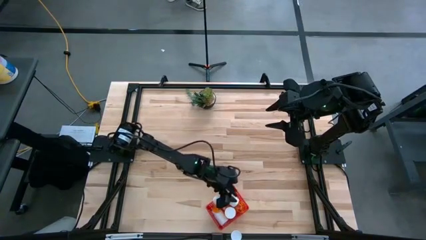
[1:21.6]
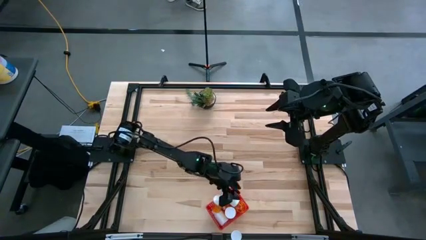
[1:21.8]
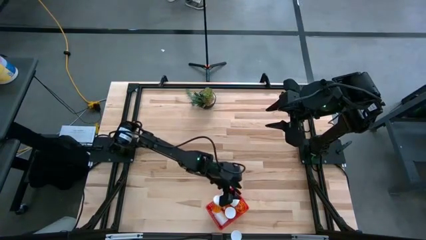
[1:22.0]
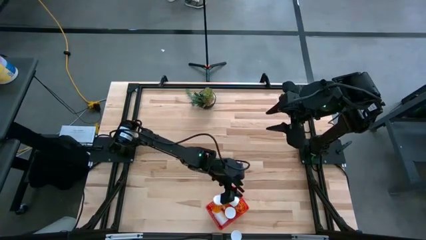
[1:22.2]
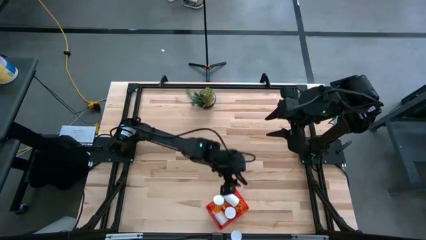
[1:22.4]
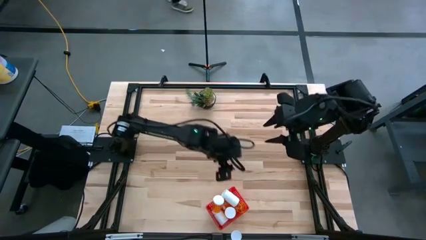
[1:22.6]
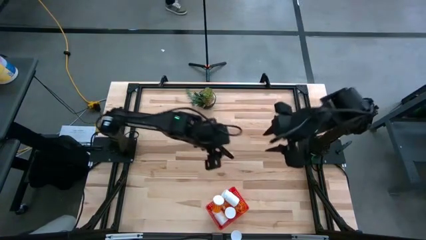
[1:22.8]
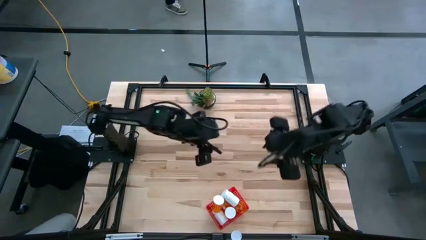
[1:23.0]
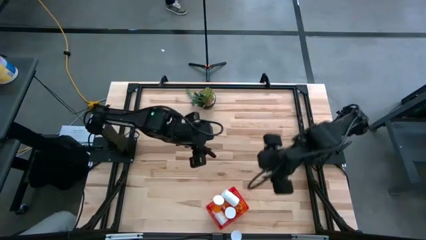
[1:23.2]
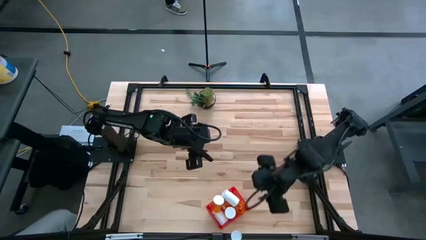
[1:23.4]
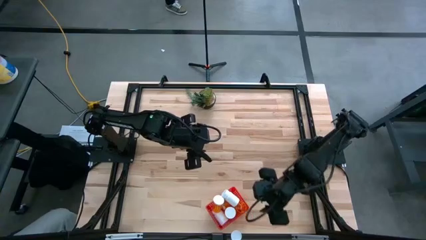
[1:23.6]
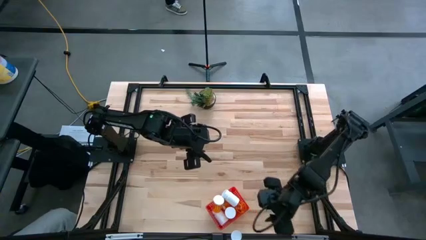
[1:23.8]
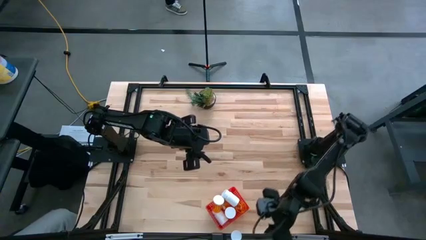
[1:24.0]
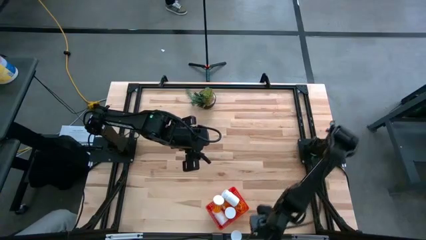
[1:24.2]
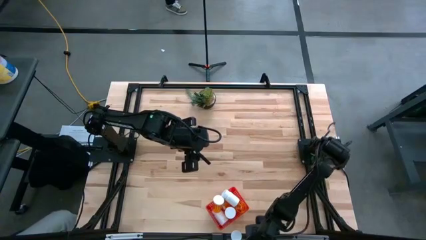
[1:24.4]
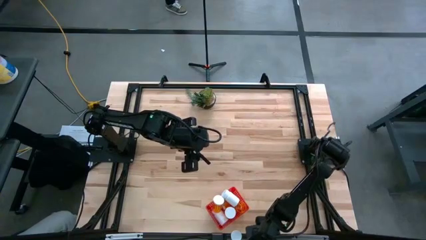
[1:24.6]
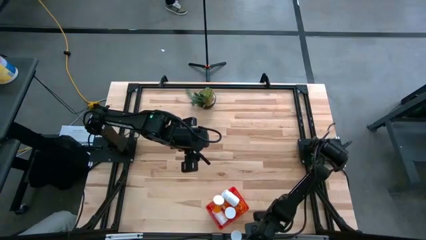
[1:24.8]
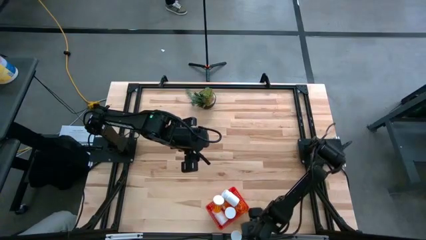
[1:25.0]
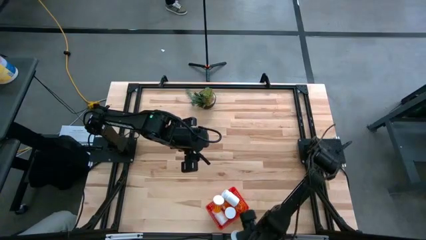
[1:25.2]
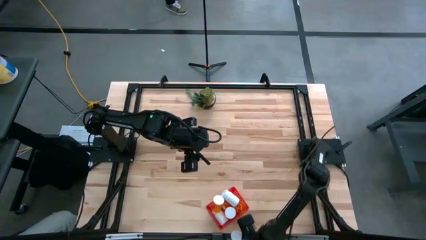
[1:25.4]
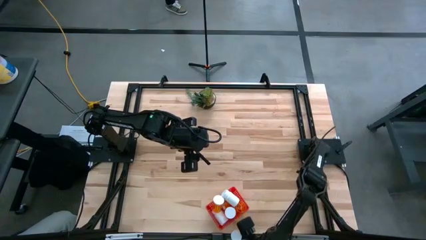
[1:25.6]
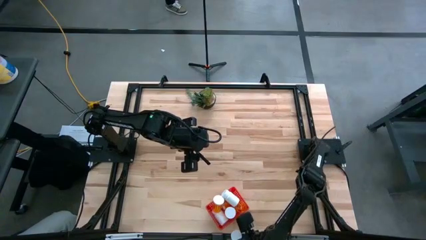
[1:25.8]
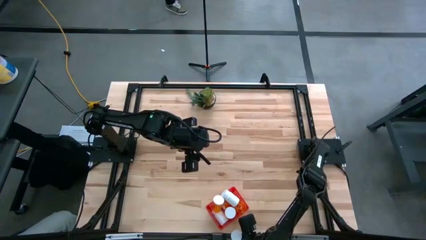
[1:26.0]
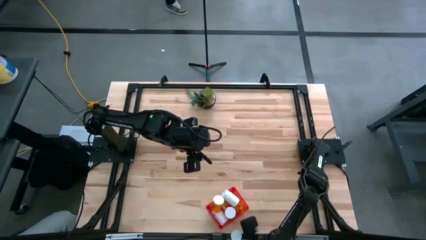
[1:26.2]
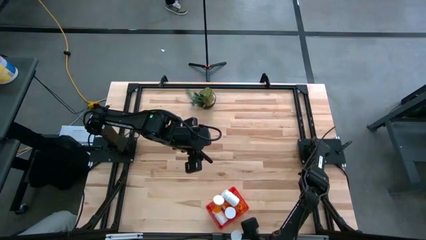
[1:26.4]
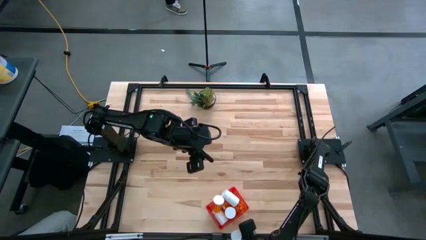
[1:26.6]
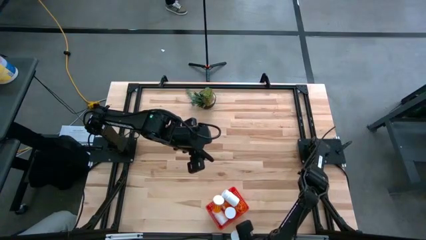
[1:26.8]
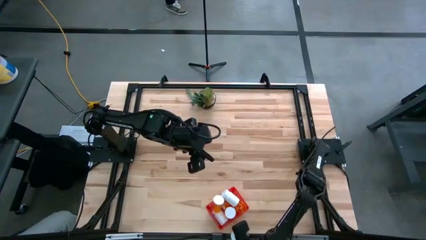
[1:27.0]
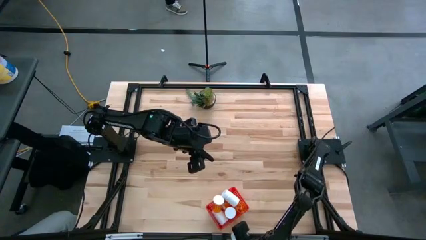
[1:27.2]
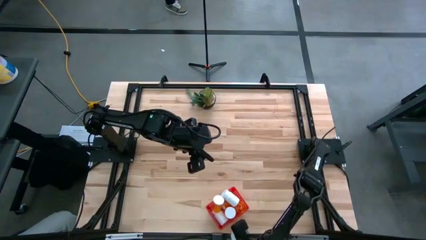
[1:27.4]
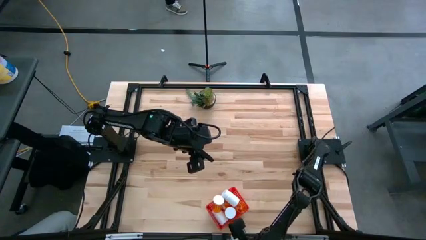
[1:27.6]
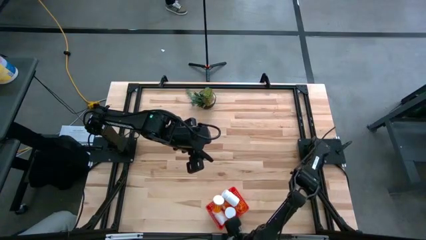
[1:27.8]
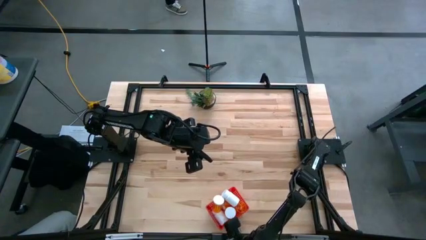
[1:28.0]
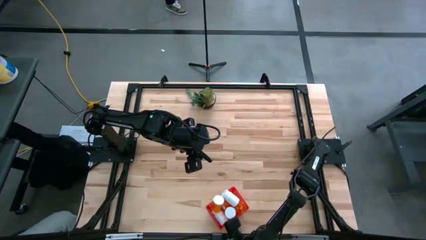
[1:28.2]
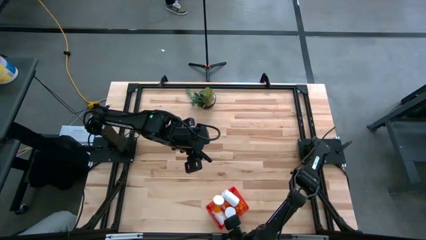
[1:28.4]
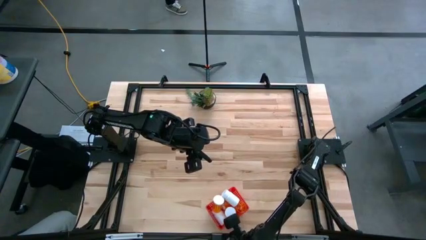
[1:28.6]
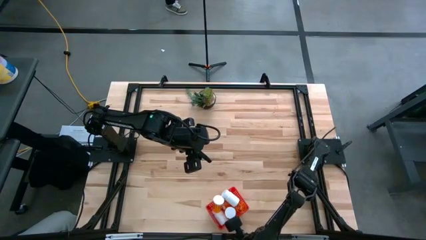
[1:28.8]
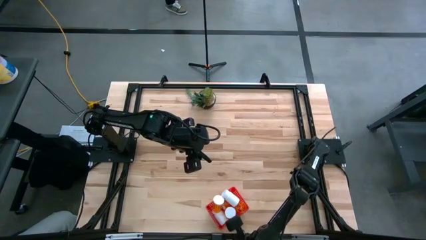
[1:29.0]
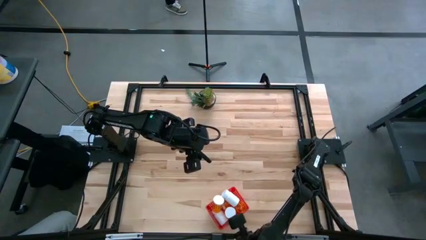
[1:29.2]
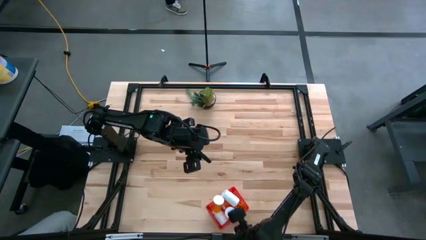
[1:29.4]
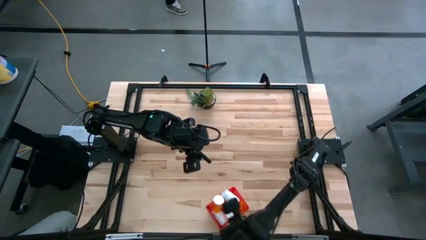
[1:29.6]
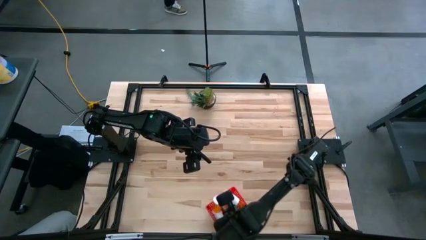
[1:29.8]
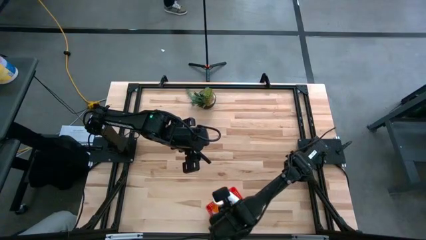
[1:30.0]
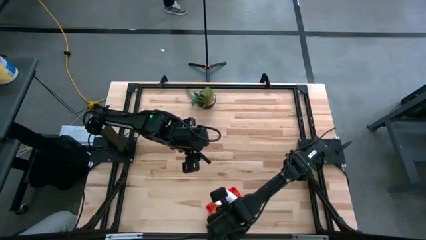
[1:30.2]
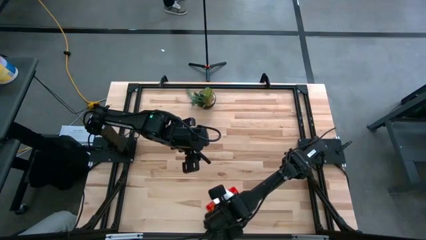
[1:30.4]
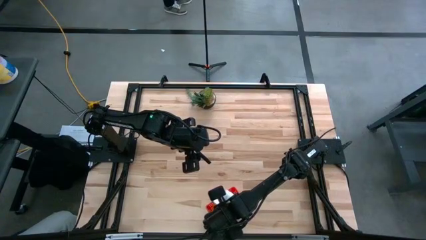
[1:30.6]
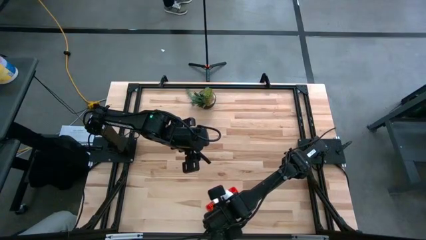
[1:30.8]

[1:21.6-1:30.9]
Task: Pick and place pill bottles into a basket
Put the white pill bottle cap into the red bin

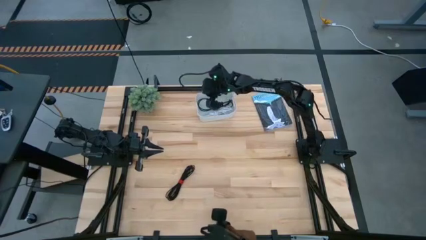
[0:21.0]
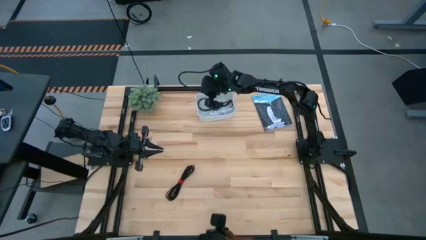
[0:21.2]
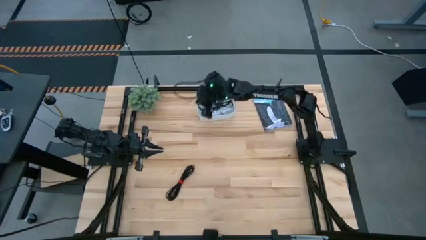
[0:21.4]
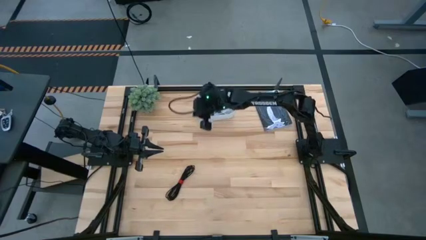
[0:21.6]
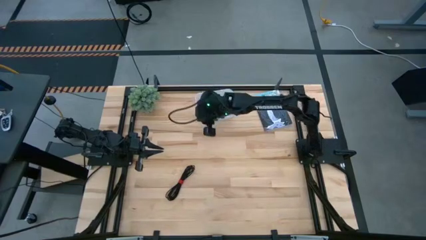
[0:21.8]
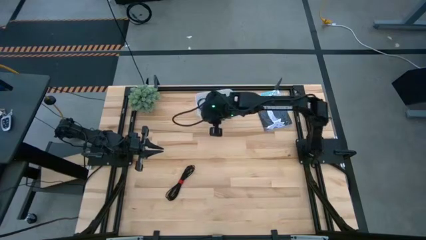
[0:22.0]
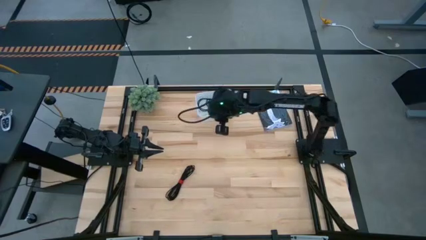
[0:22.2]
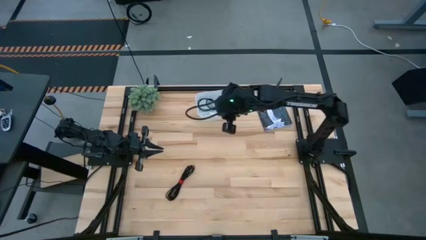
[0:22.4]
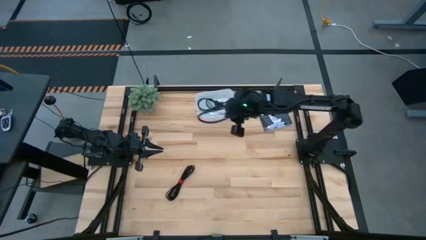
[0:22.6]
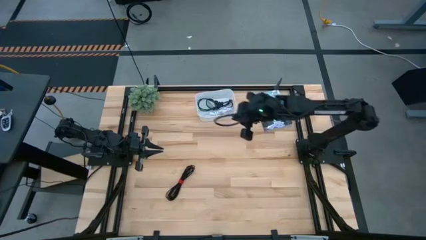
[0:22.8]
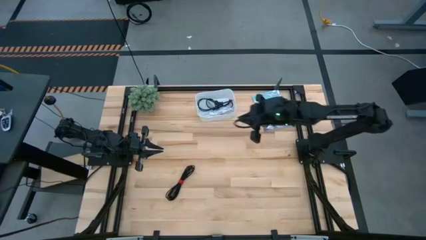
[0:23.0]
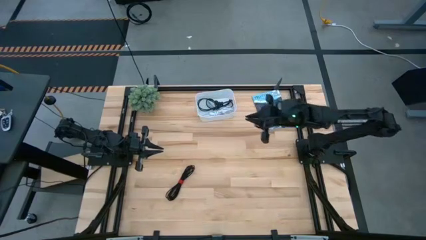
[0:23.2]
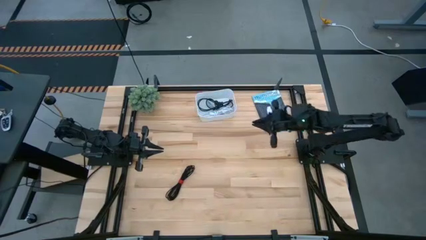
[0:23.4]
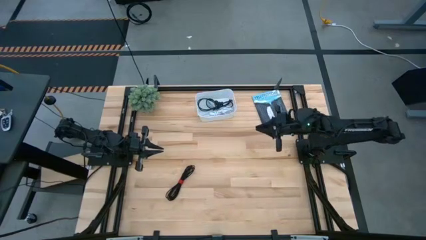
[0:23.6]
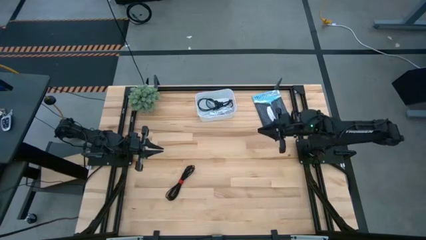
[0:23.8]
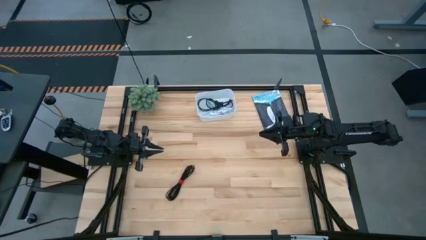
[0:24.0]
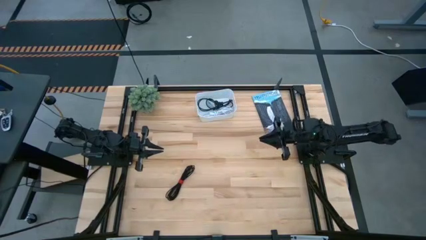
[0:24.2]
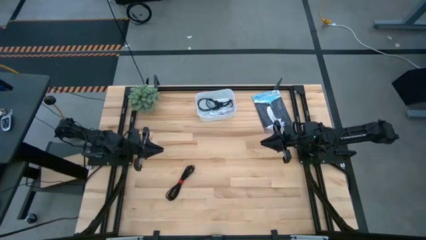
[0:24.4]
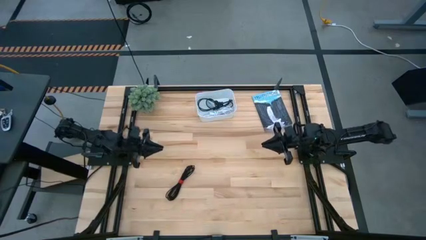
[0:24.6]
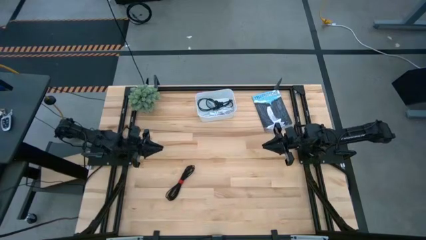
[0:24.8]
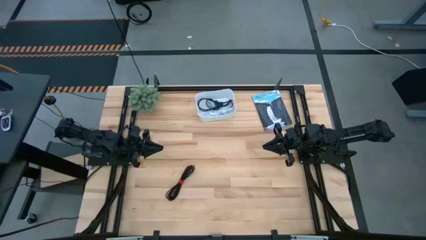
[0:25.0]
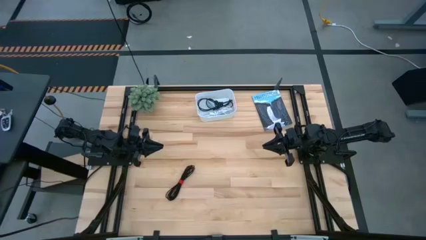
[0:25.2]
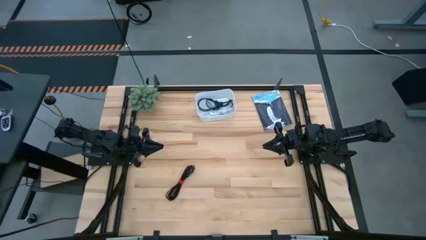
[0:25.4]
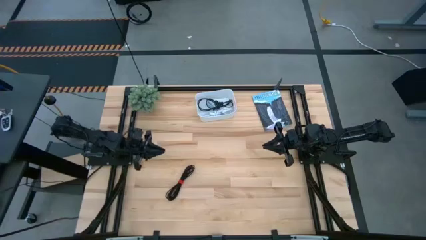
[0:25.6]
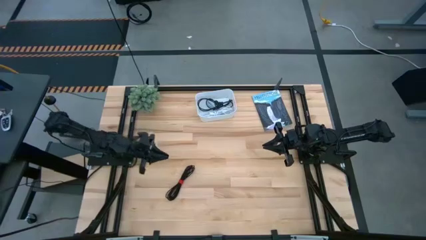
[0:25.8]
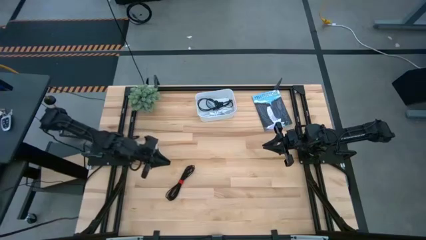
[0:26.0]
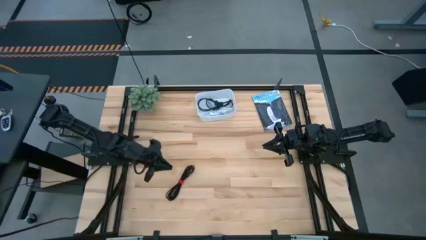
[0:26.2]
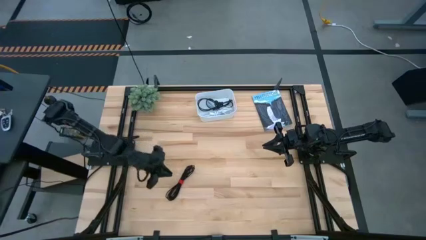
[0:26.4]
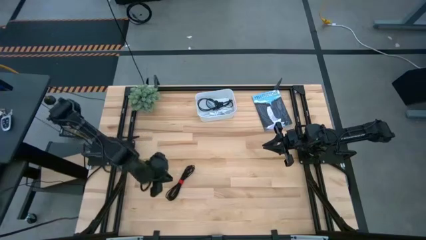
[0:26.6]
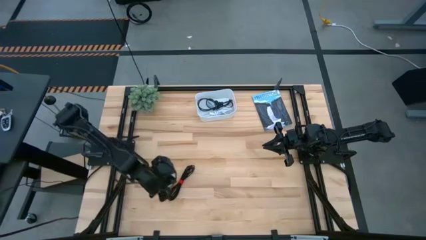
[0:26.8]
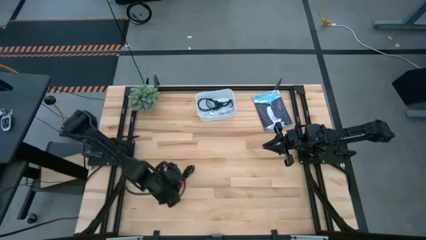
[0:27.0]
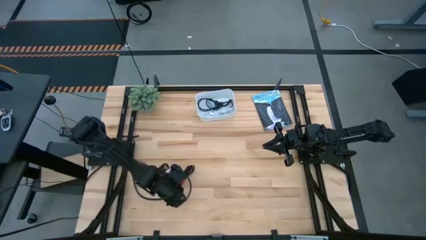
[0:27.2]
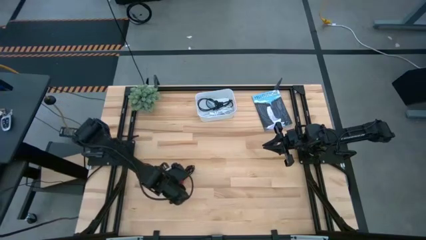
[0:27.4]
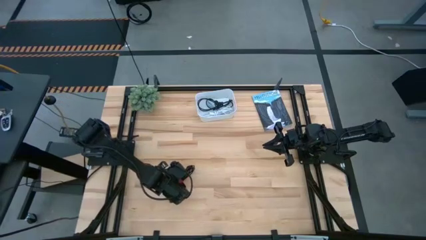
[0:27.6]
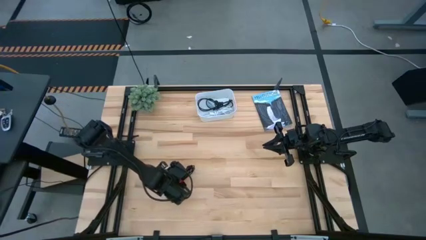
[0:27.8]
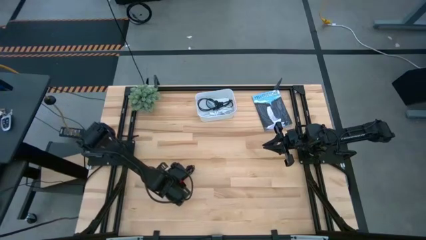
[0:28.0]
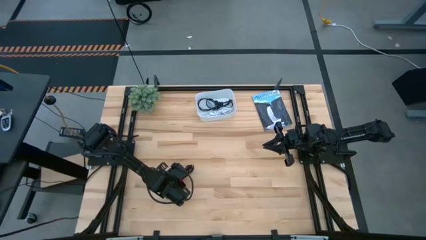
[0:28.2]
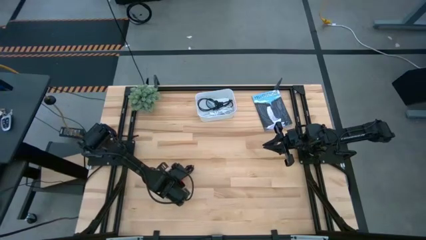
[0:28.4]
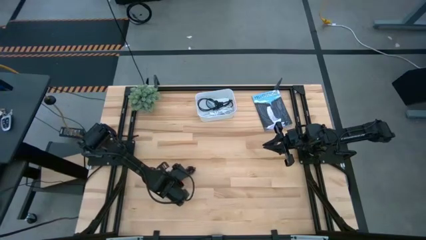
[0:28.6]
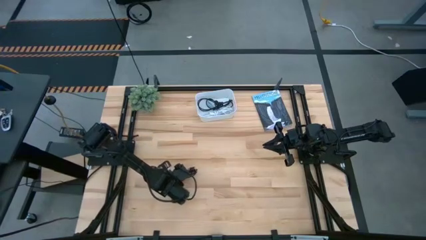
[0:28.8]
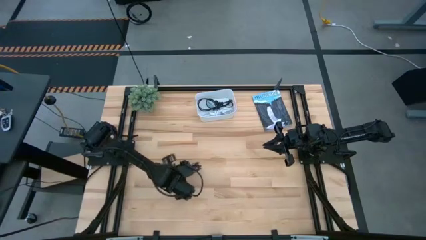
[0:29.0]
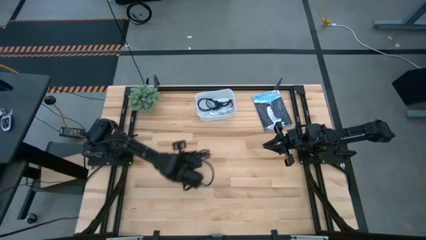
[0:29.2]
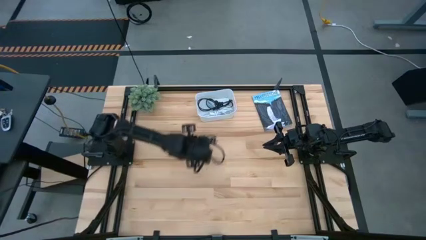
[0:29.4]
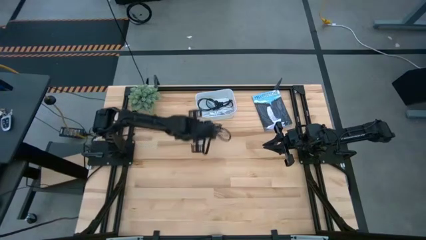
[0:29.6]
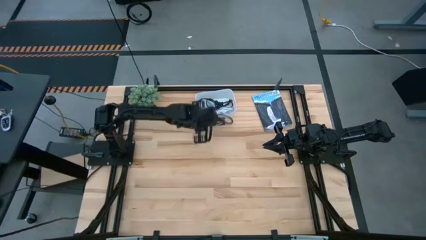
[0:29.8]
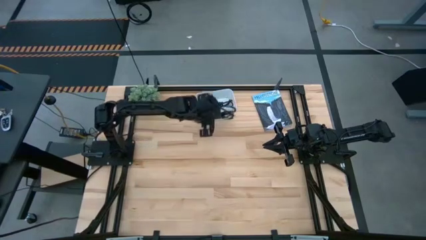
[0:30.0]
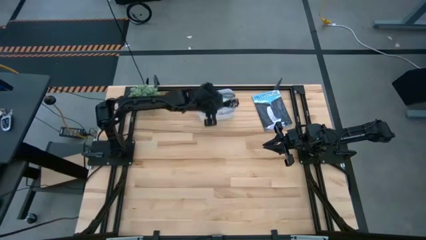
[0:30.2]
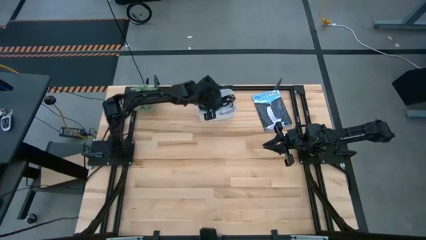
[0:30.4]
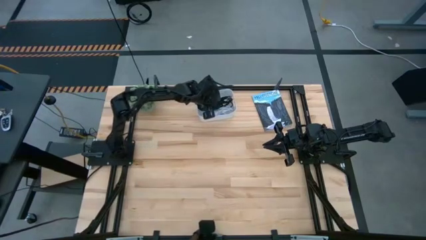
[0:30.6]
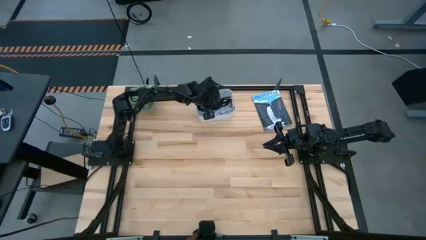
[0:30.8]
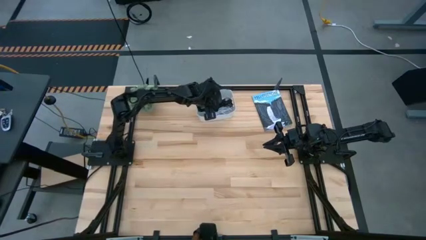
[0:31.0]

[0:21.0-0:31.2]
Task: Pick and place USB-C Cables
Put the black charger cable into the white bin
